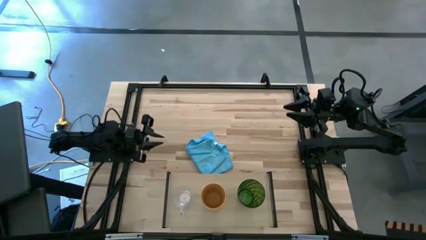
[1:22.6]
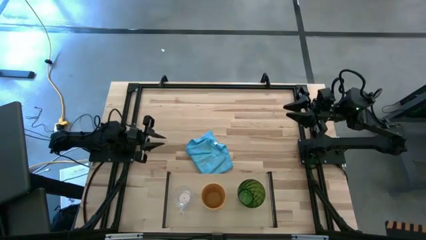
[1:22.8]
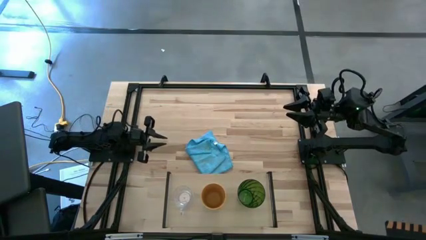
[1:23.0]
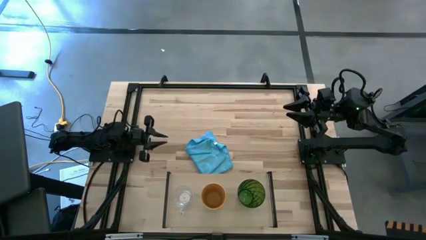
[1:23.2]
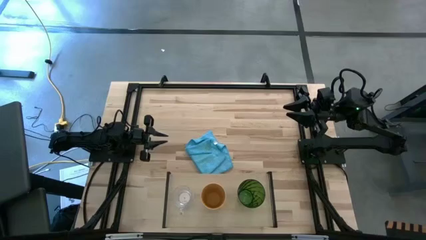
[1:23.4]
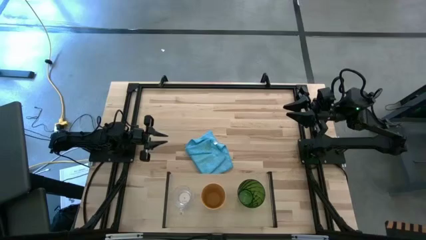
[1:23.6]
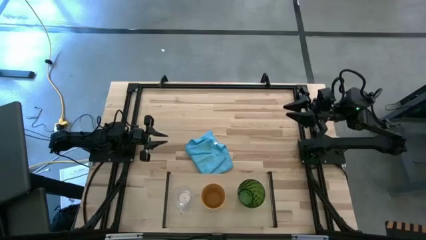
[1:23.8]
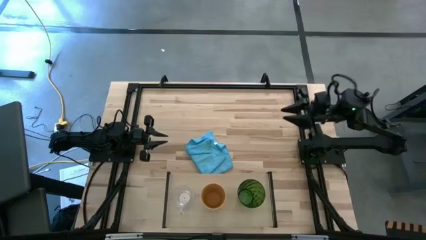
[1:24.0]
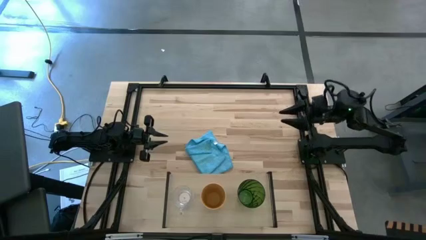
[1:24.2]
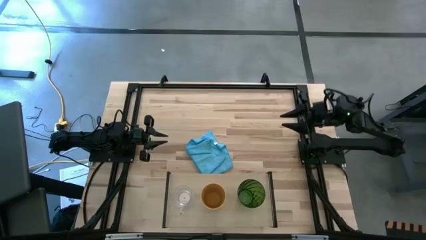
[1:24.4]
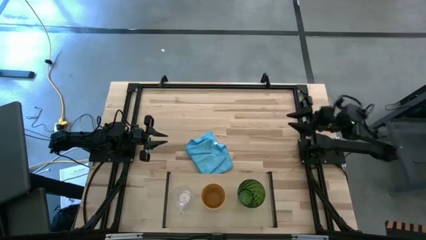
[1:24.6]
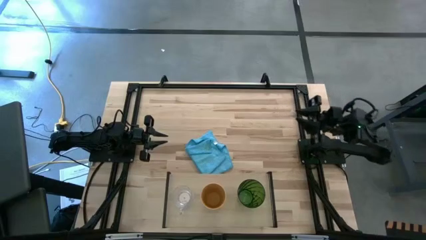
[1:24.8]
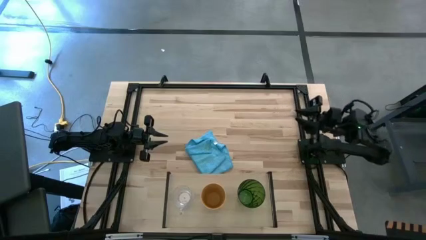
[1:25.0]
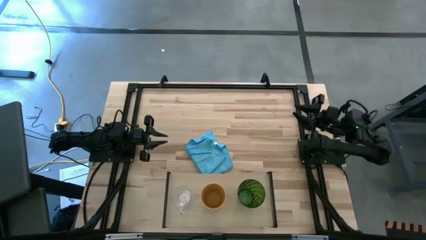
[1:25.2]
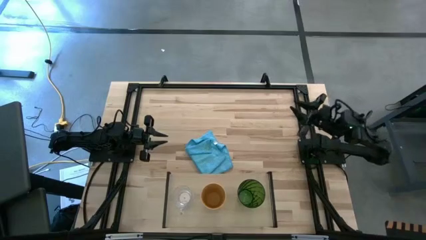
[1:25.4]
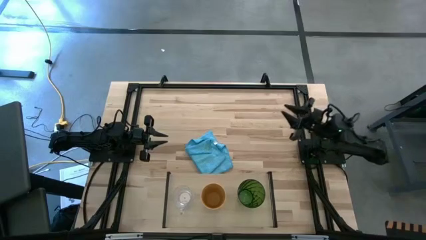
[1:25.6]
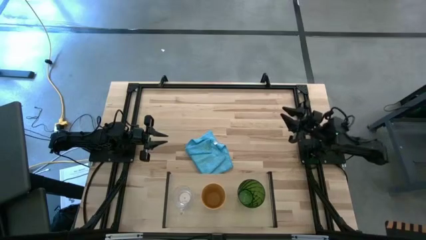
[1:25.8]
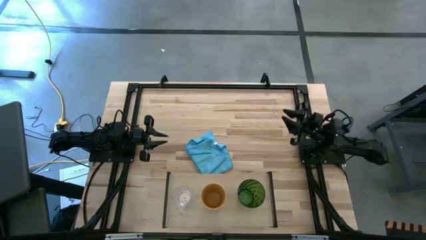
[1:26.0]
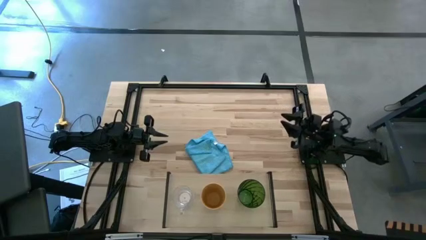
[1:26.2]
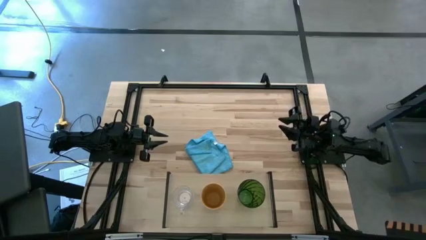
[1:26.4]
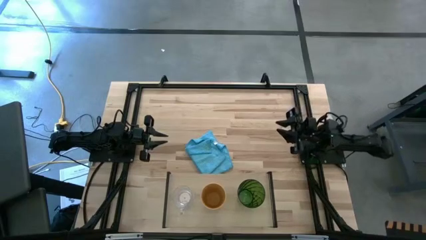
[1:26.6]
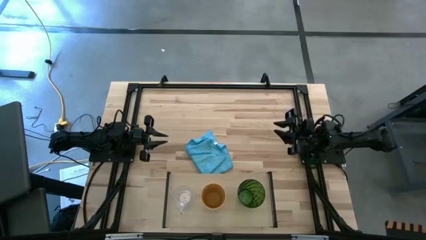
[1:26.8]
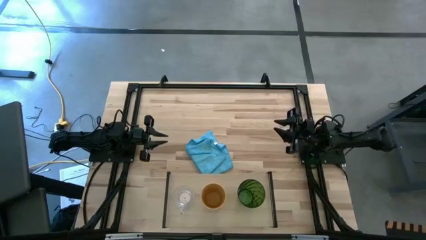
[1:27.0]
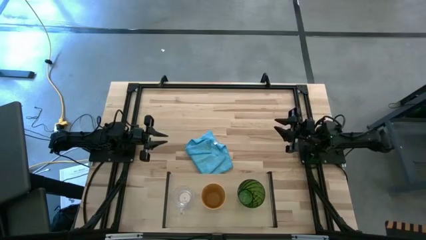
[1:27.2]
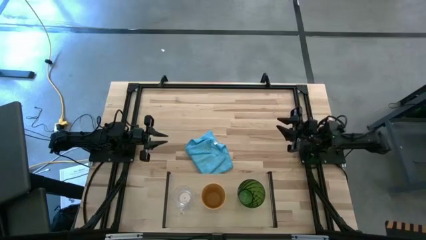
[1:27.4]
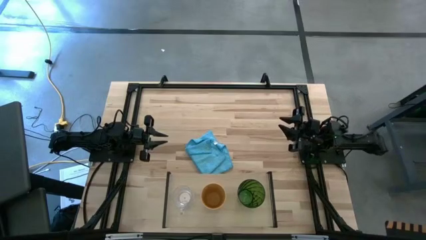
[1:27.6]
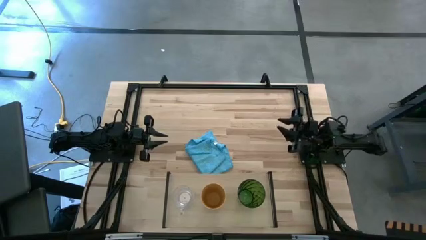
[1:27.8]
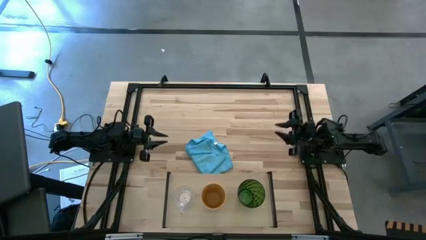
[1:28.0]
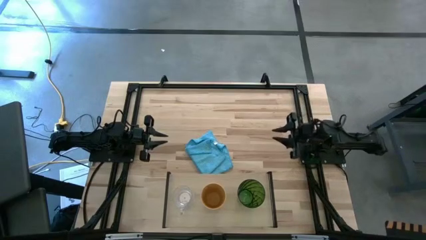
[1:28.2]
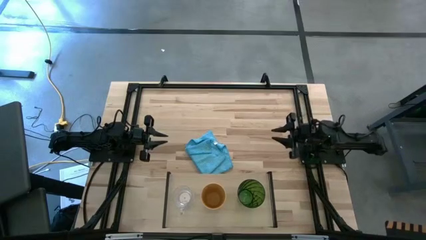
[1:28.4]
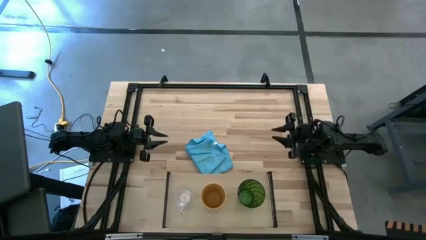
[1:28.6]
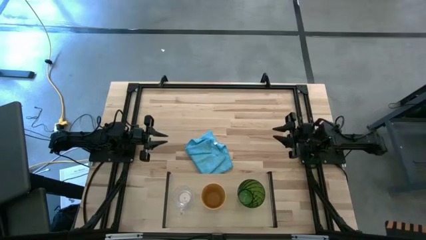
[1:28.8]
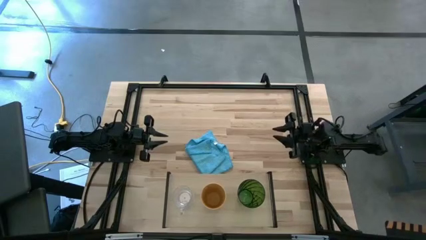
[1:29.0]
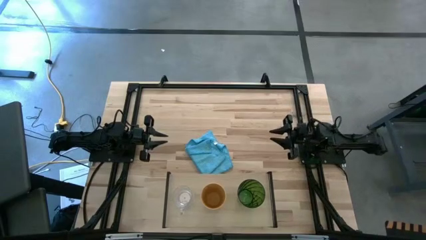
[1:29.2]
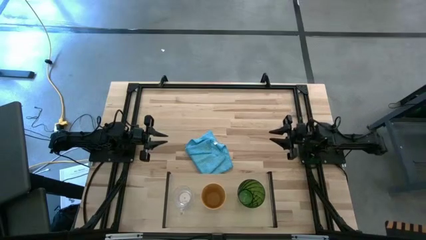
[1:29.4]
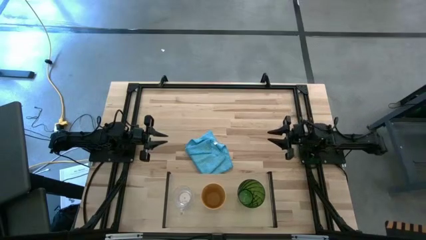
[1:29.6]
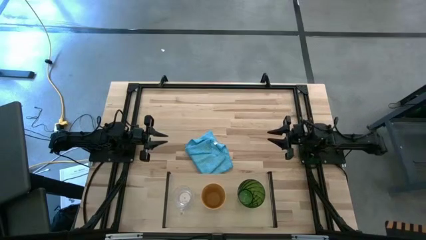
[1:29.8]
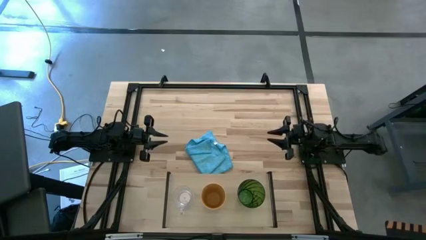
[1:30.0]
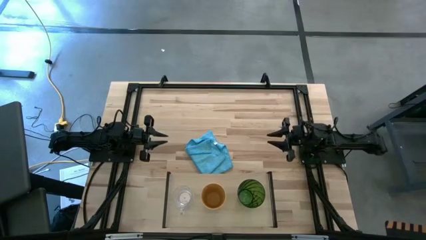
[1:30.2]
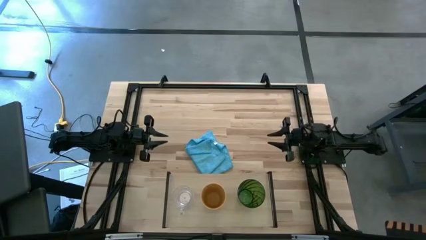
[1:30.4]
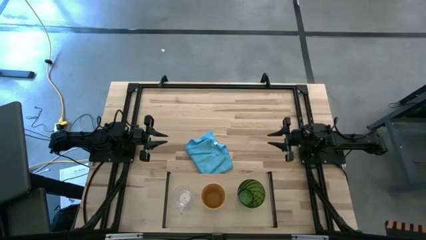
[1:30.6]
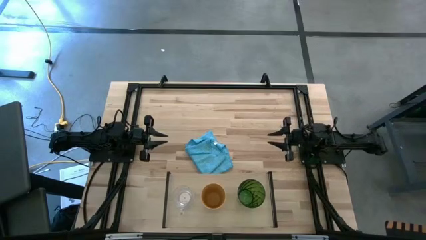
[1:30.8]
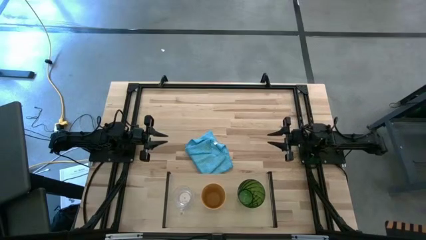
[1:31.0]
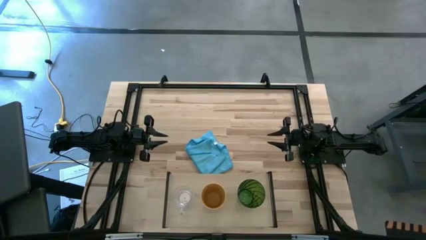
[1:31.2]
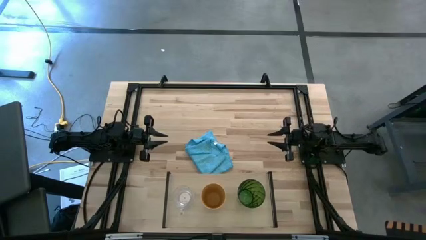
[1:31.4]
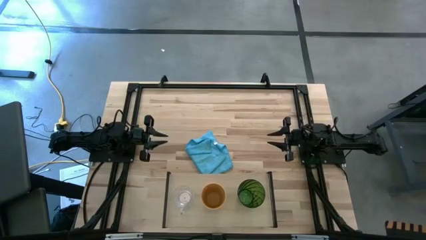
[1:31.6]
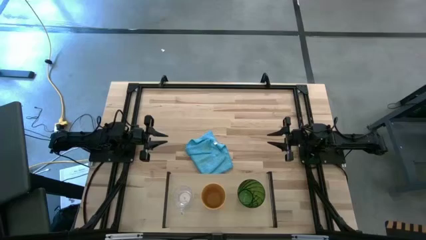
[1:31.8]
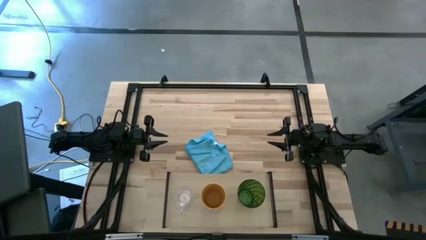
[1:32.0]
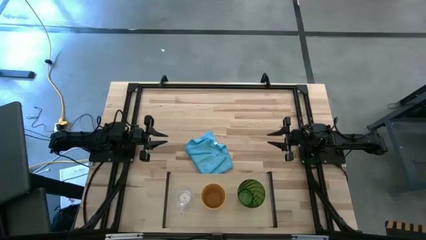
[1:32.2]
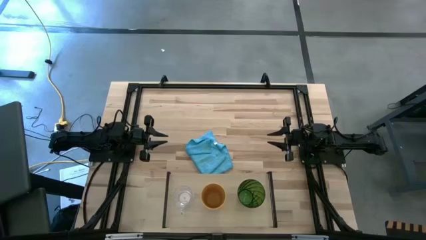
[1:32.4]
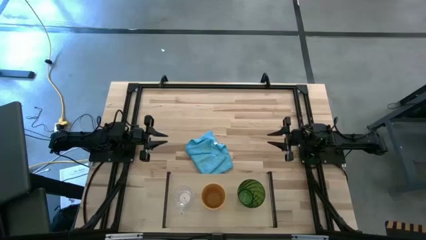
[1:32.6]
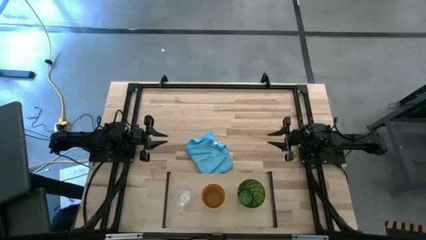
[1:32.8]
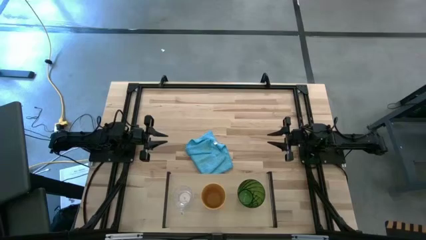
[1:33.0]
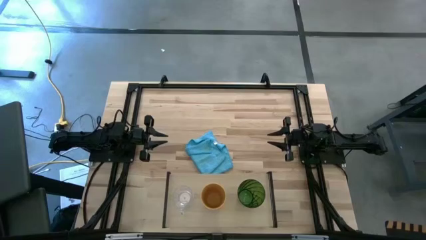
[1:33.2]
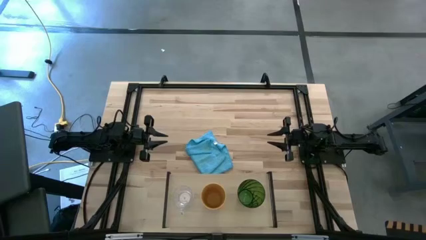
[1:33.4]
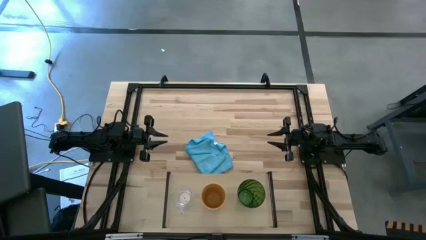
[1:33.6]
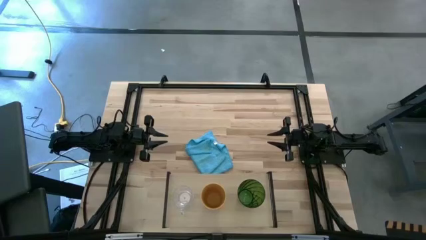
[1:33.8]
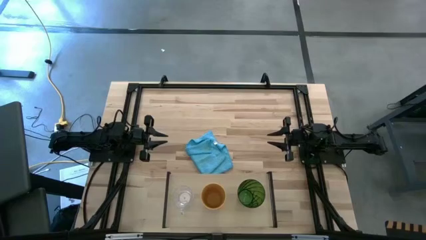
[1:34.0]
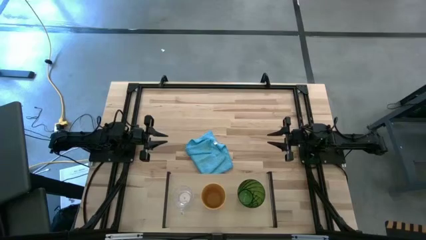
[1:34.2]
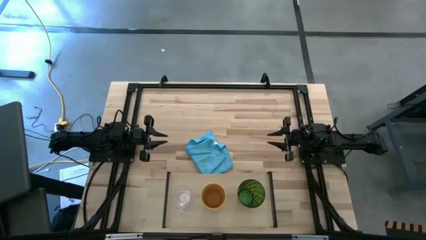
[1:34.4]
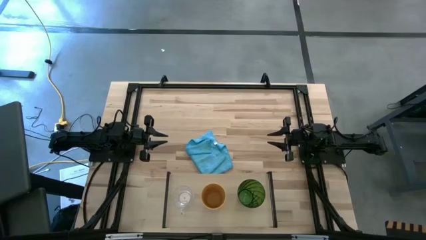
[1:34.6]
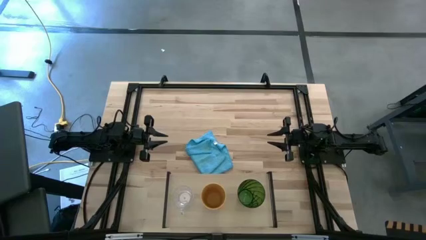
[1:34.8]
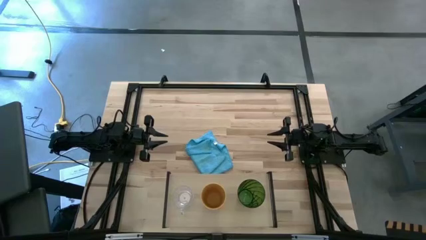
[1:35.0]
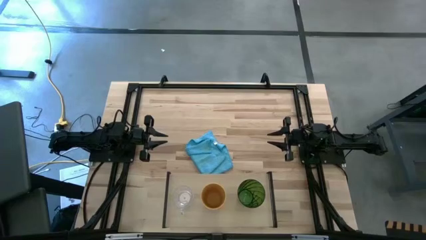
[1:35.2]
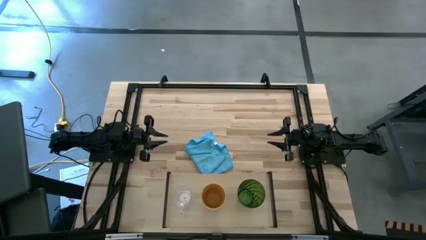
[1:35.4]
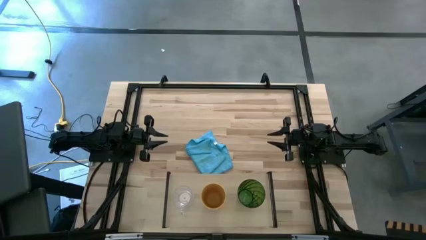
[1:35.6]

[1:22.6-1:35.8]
Task: Stack small to large cups/mugs on shelf
Return to Home Position

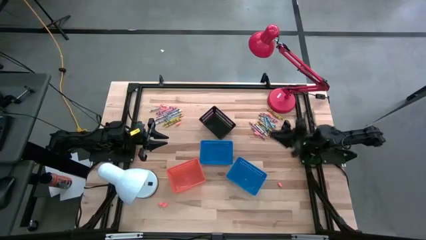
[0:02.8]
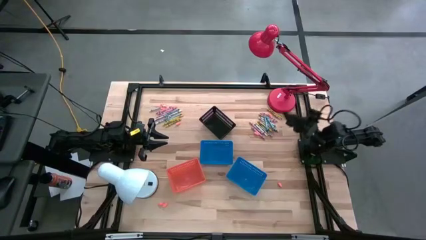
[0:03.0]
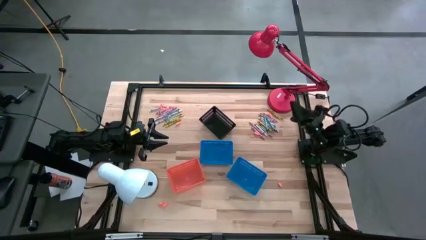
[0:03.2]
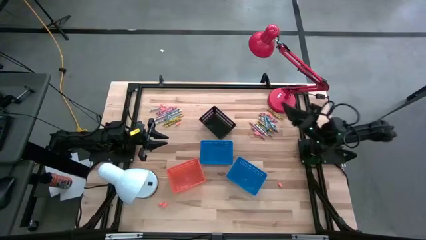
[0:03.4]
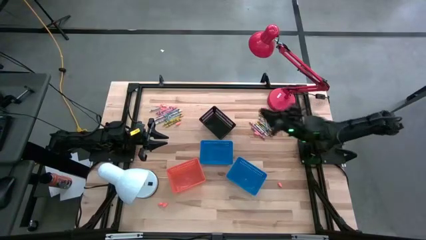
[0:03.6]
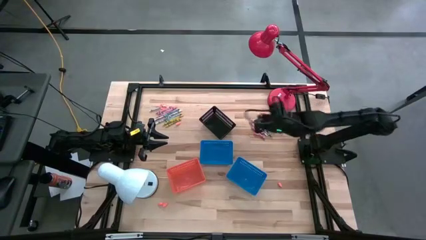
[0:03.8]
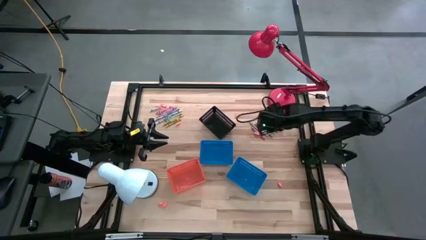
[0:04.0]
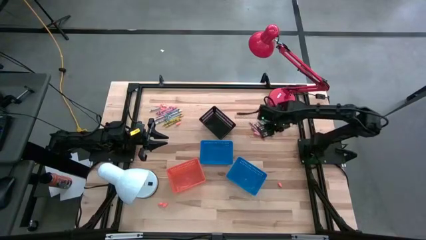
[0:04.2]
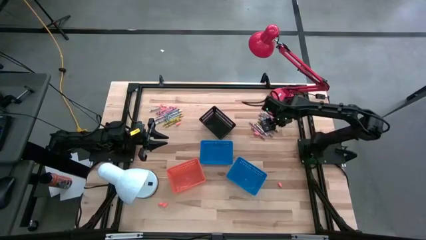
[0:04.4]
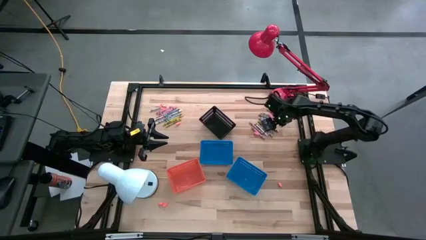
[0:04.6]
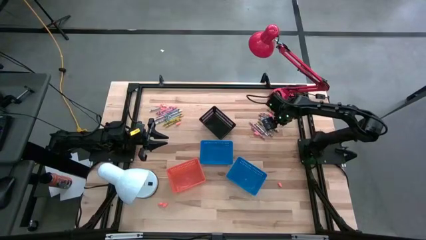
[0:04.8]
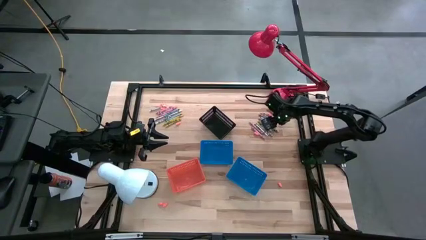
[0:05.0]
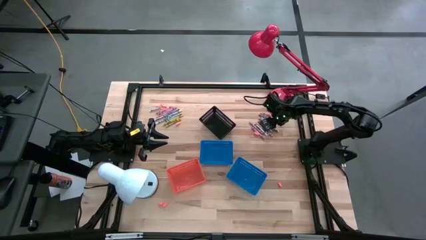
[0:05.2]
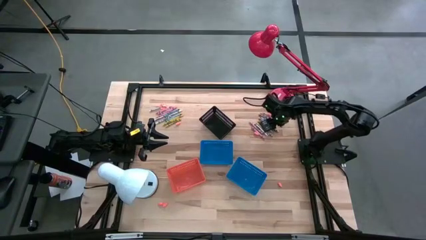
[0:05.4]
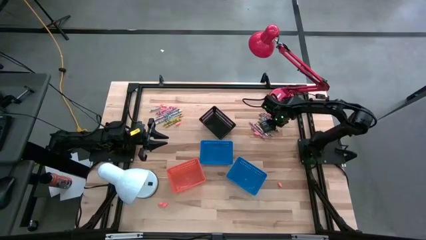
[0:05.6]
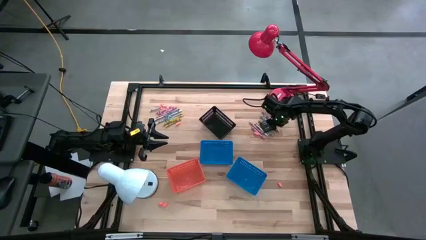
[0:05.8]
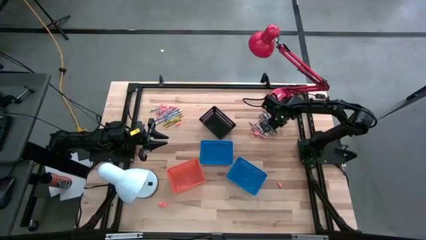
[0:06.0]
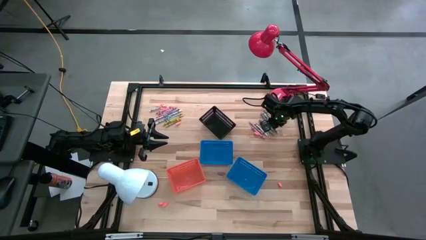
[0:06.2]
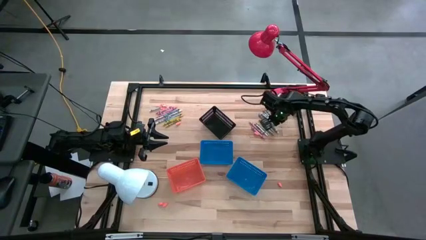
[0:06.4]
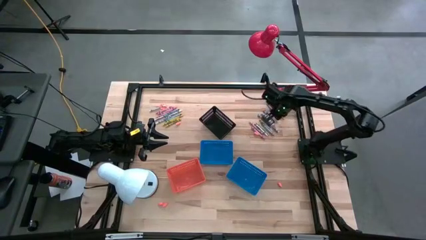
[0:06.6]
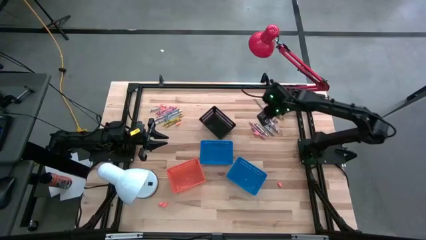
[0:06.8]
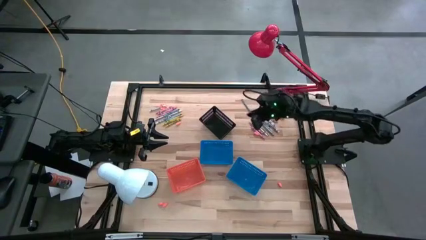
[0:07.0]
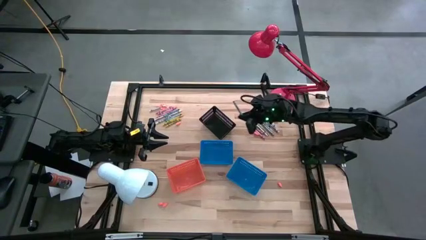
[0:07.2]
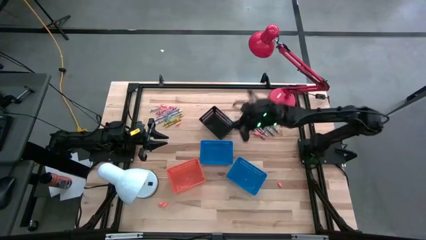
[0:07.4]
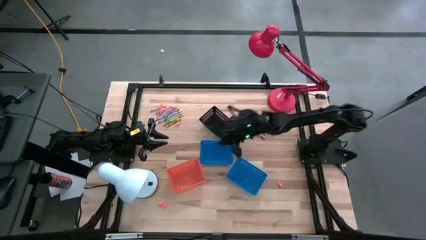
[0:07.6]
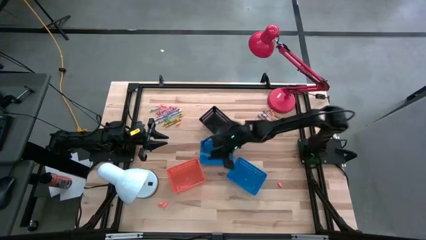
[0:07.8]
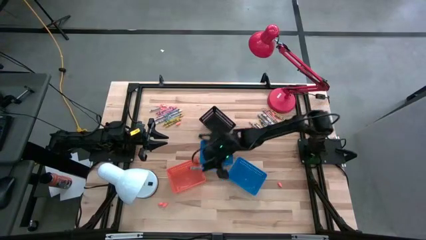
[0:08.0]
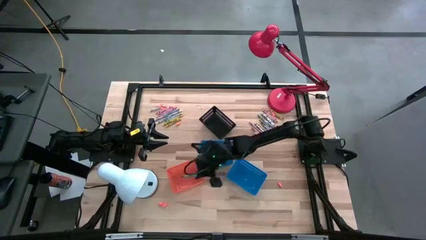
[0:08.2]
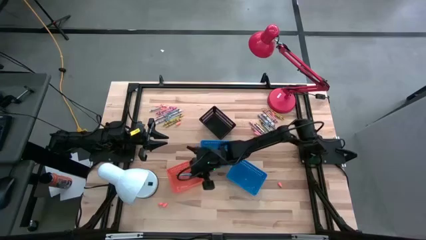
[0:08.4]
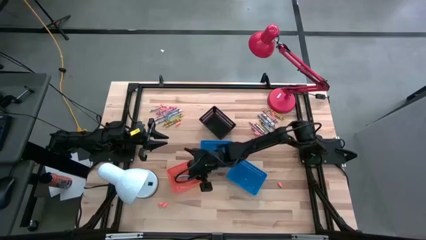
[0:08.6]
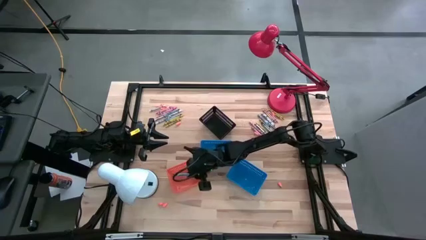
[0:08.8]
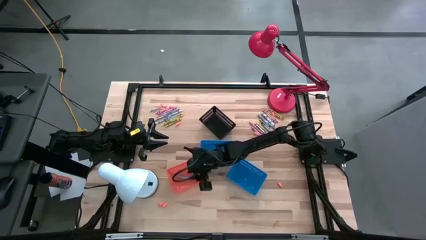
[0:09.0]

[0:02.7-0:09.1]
Task: Sort crayons
Put the blue/green crayon into the orange bin
